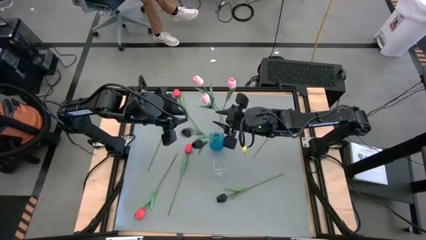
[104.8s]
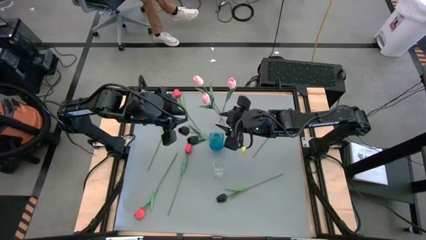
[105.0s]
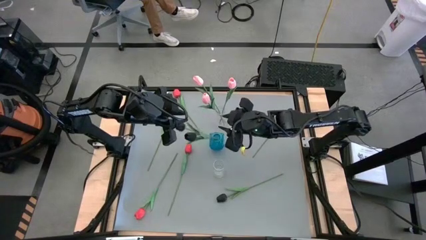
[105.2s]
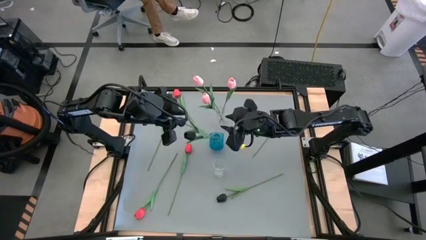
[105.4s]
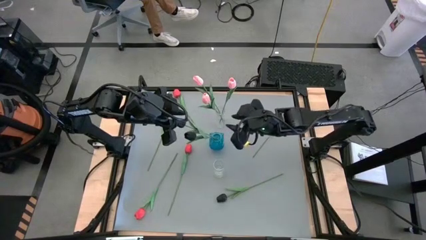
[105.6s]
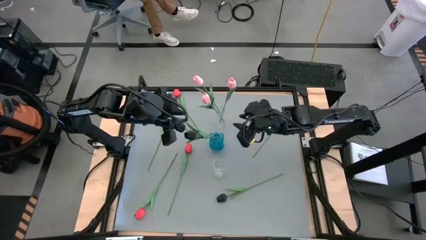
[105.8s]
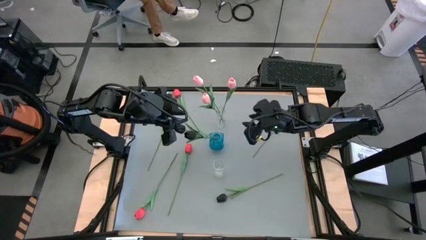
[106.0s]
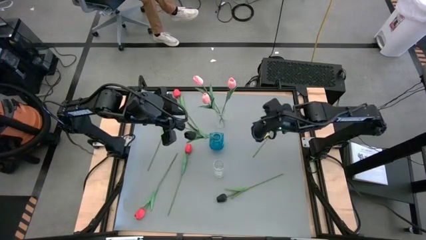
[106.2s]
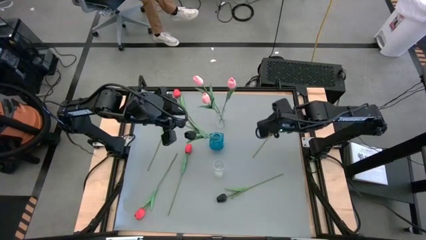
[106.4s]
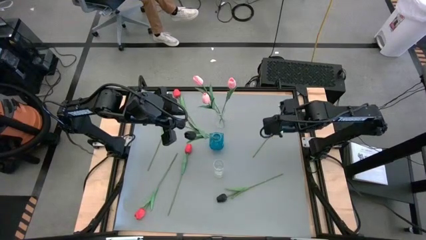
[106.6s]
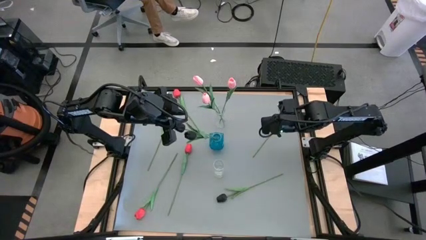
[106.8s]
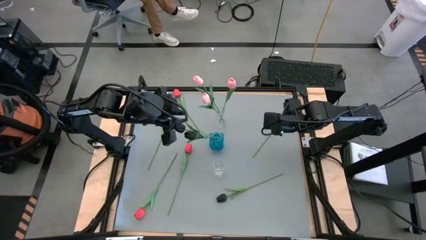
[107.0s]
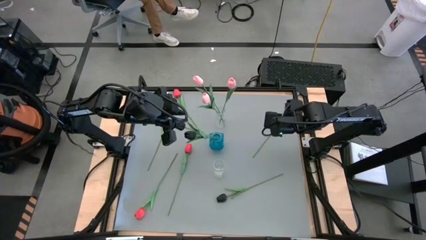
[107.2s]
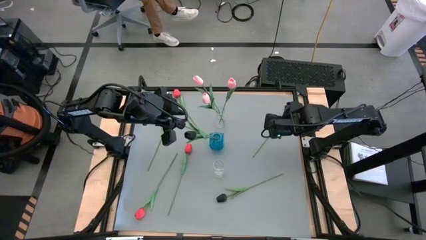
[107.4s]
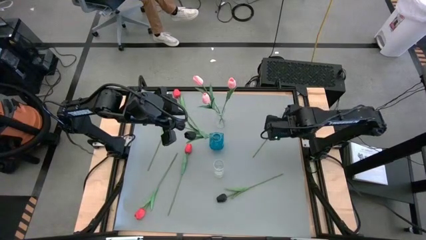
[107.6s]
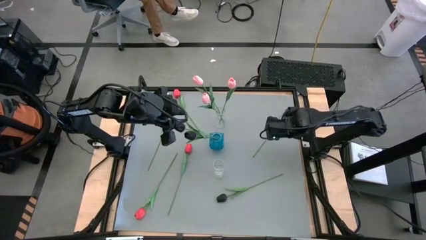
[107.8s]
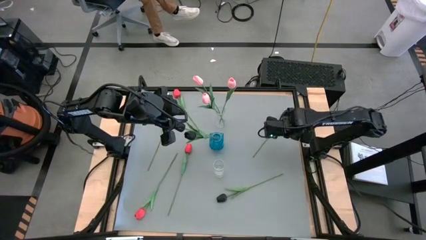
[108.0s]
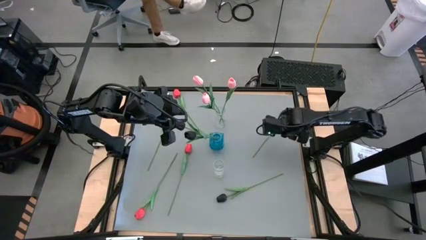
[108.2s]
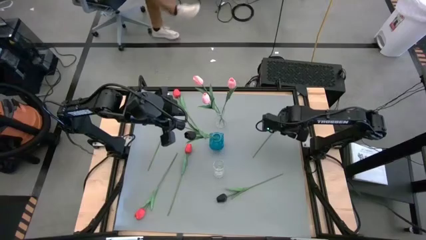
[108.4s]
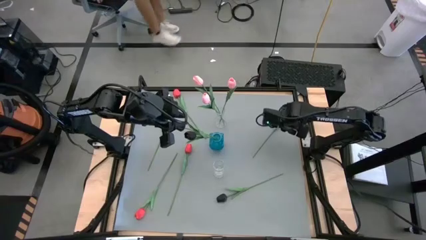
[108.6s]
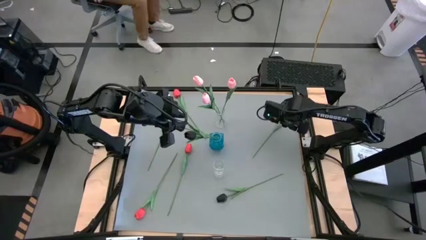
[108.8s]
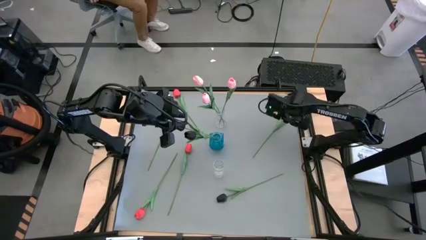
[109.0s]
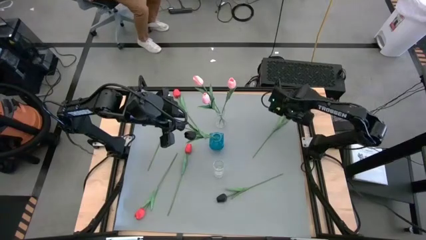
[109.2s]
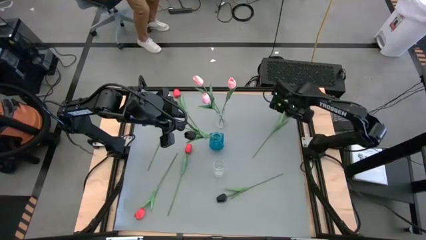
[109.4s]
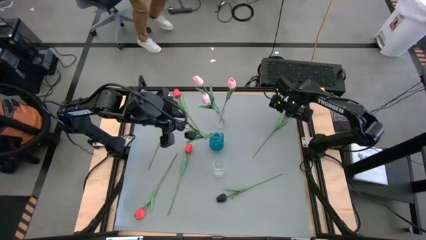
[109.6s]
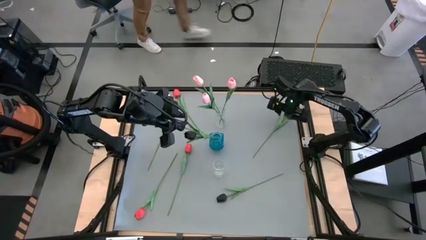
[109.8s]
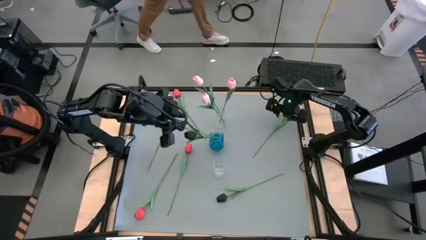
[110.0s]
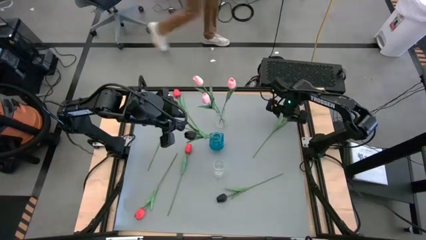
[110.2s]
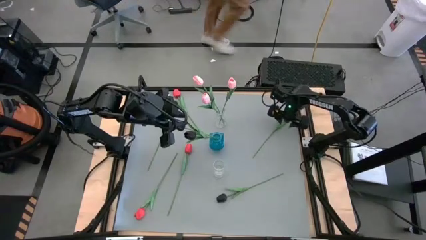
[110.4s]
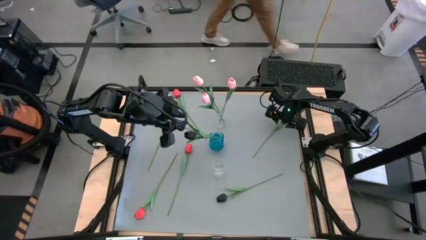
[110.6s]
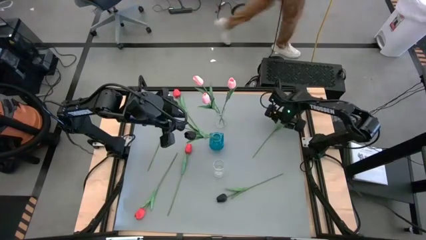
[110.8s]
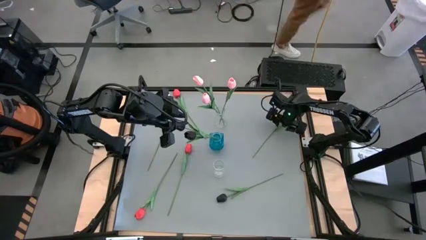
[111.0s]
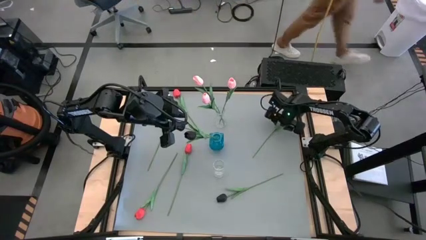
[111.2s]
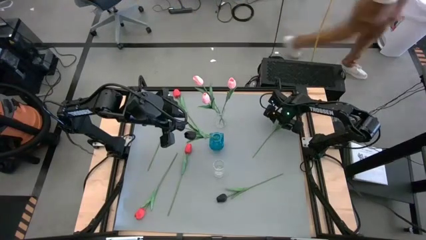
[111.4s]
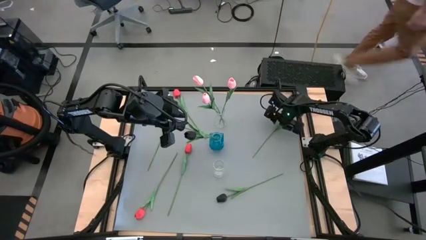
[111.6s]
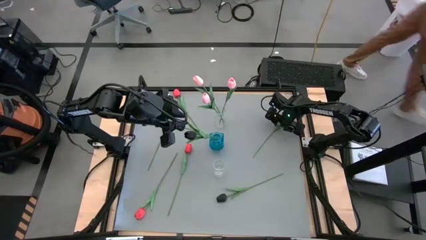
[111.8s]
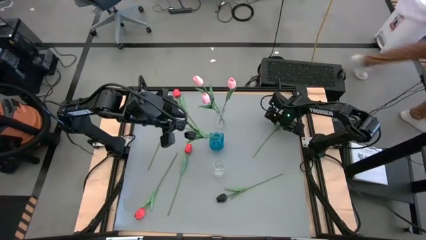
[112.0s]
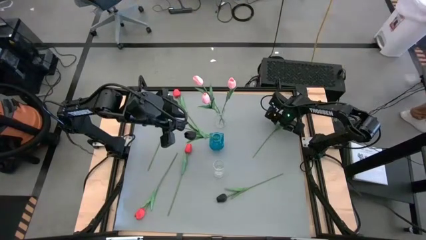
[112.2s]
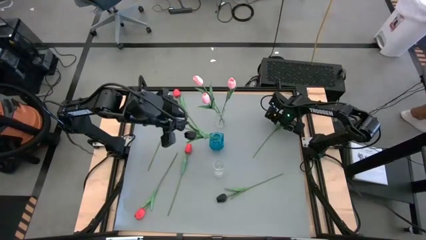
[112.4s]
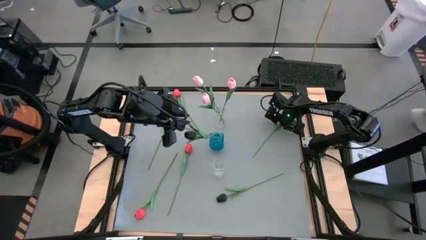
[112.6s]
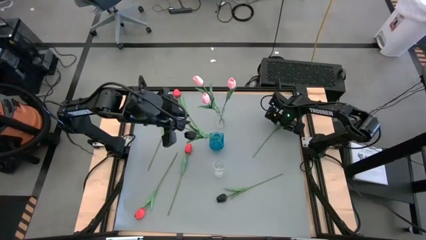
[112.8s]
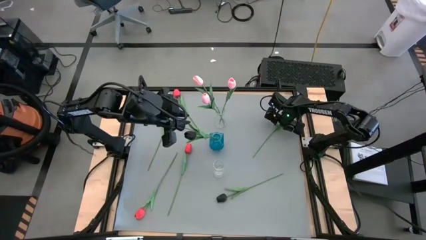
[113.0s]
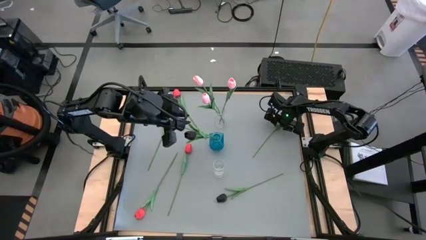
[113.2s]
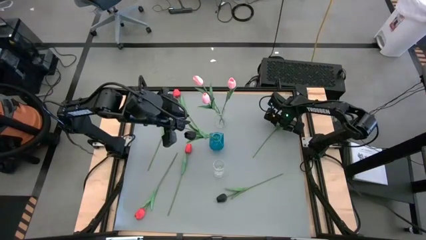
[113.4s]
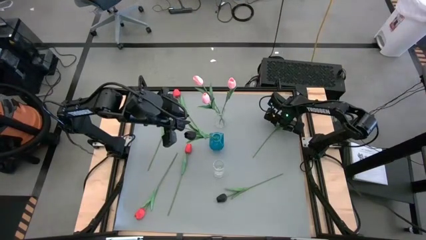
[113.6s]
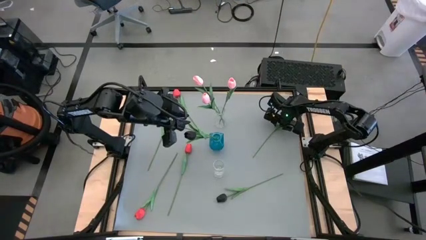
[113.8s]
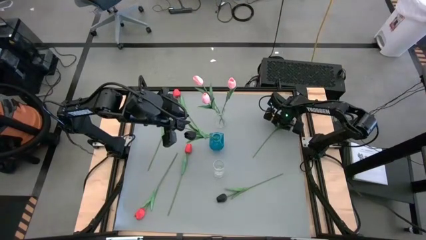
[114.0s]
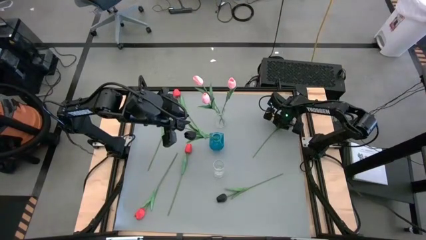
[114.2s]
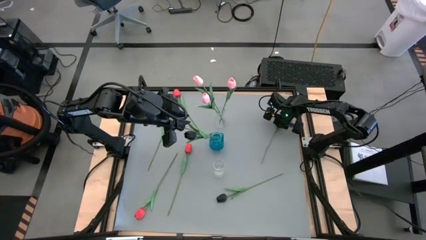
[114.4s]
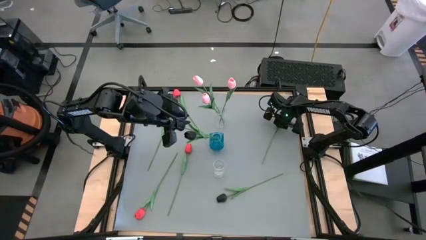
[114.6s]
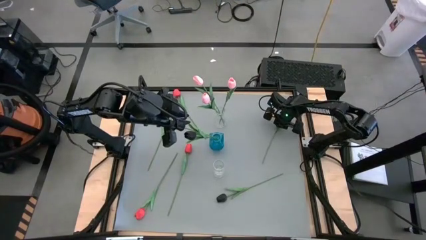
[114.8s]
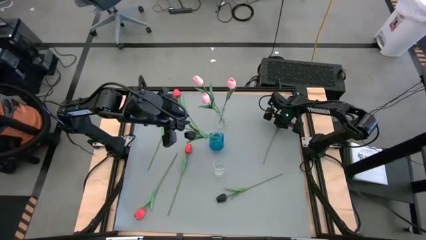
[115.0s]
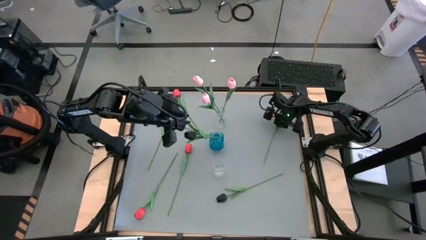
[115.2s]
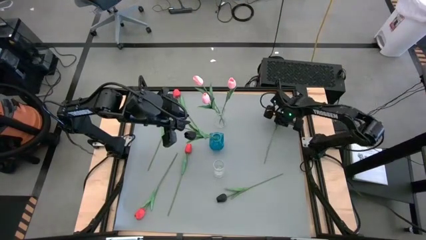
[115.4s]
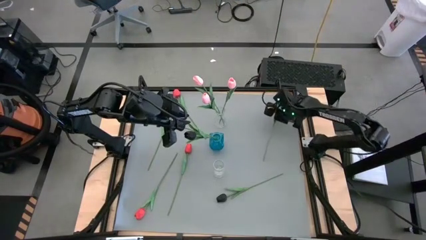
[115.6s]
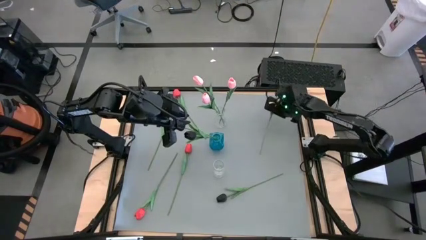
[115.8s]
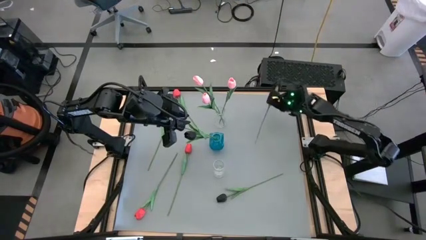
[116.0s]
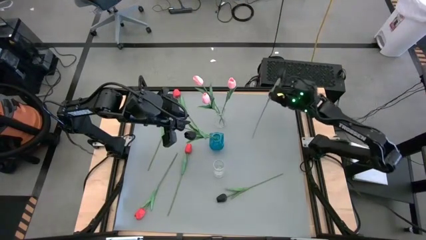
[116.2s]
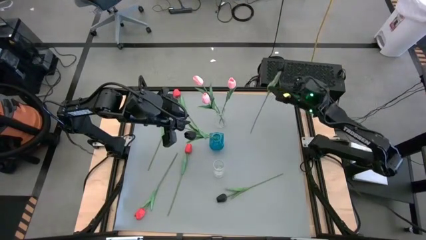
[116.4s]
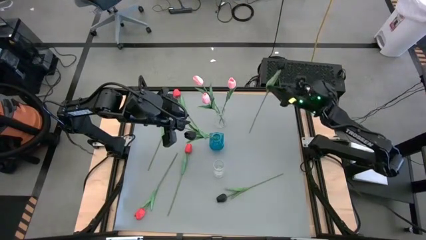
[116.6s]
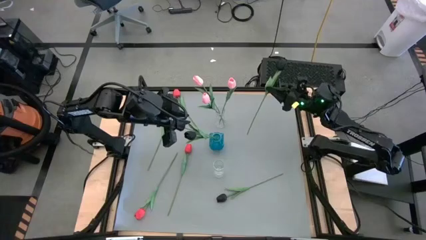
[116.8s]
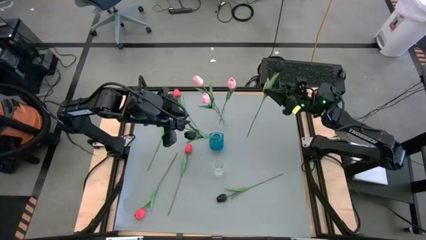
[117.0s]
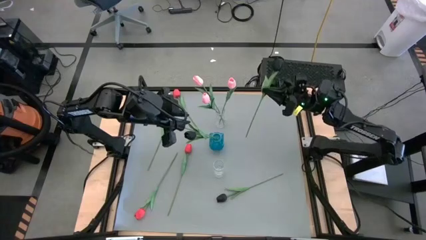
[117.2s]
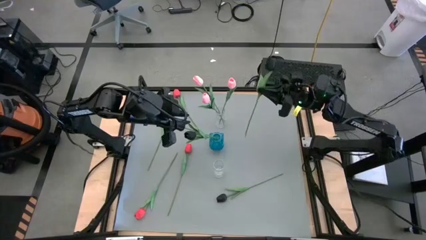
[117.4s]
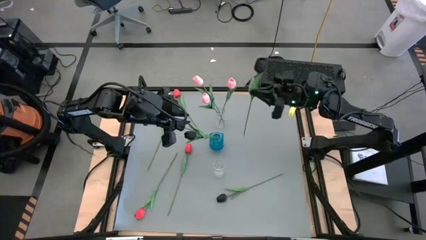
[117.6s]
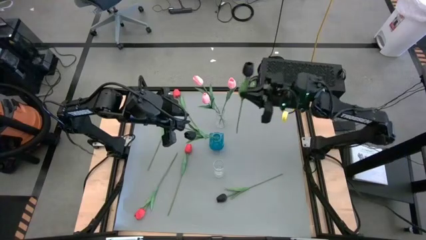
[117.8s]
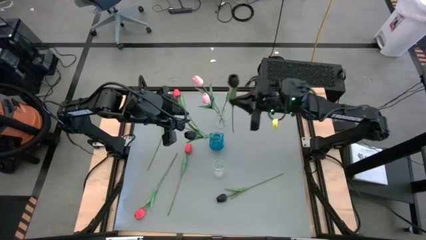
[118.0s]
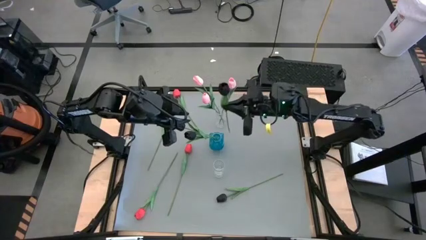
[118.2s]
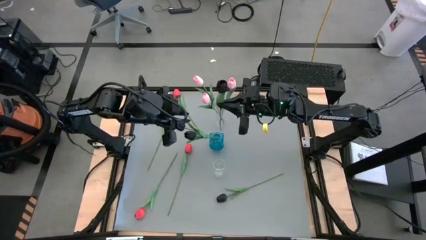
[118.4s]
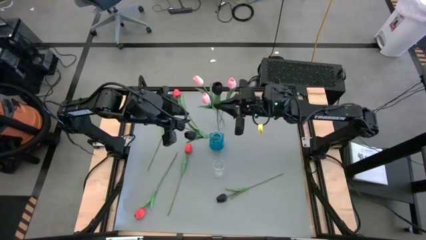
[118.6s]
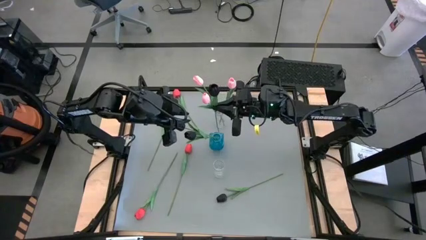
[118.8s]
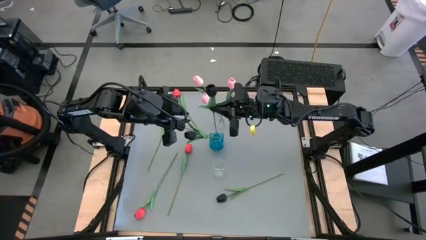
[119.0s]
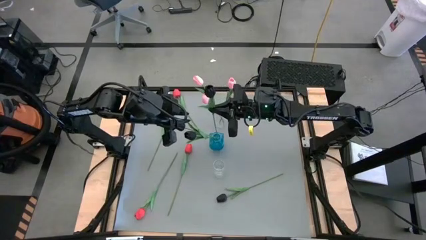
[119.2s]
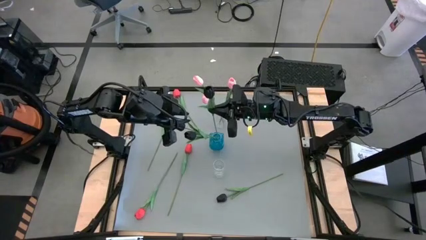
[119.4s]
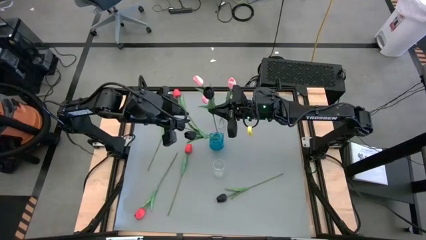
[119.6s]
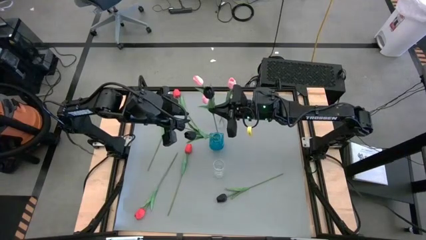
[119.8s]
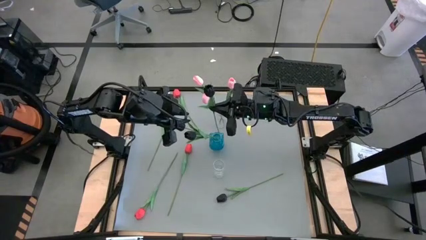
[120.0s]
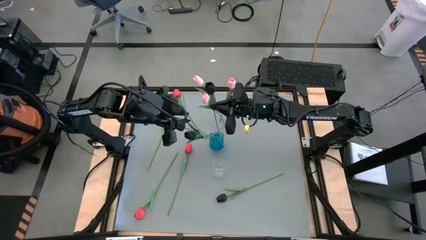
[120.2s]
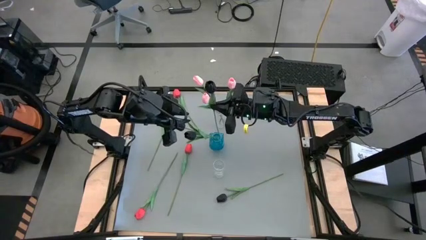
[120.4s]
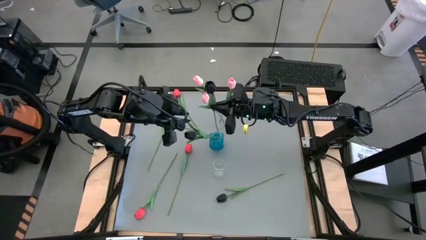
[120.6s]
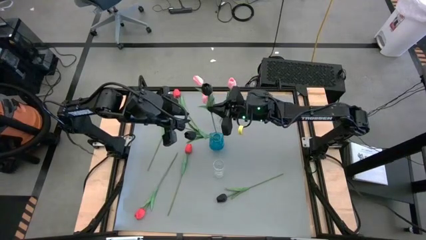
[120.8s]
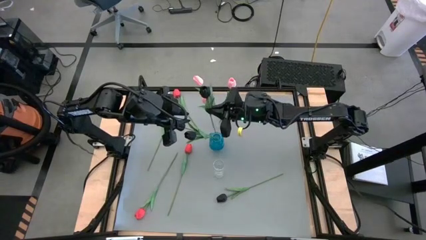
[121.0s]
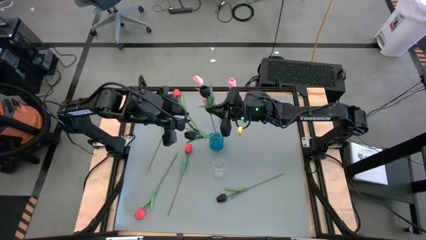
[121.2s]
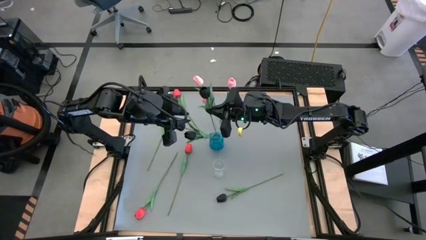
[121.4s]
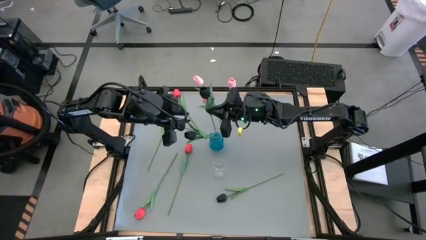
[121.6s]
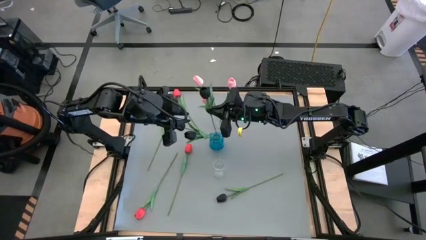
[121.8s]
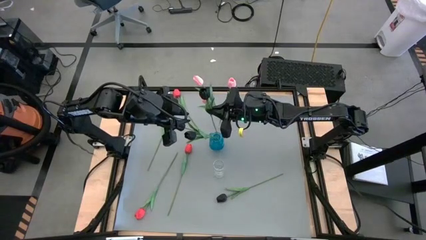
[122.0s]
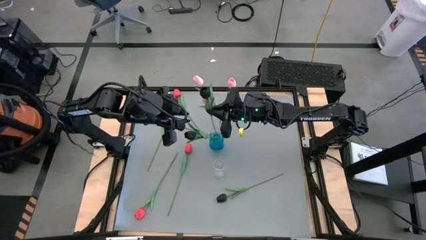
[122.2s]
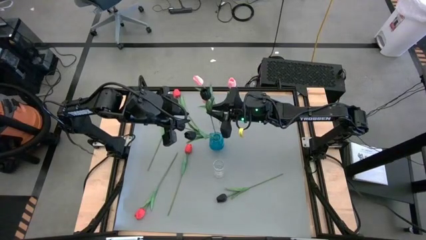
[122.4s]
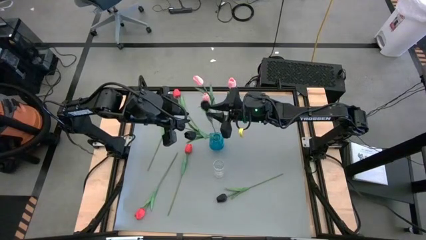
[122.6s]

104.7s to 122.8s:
Task: Sort flowers into vase by color
Put the top black tulip into the blue vase
